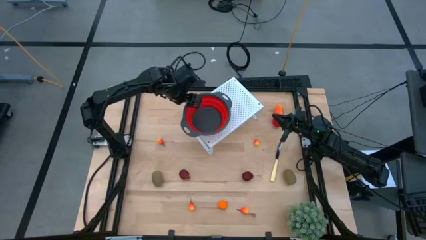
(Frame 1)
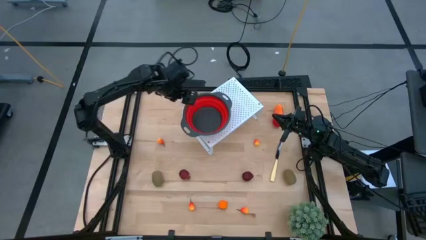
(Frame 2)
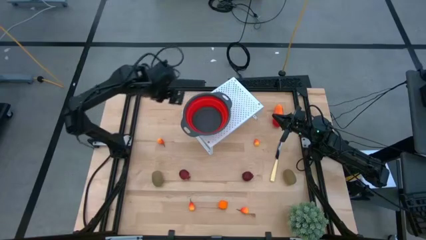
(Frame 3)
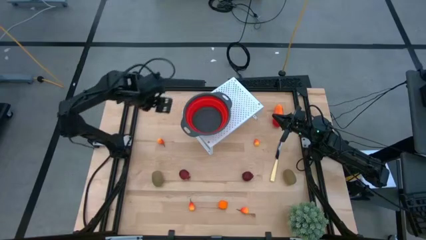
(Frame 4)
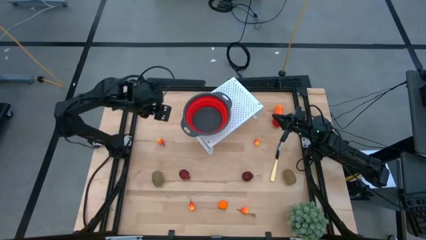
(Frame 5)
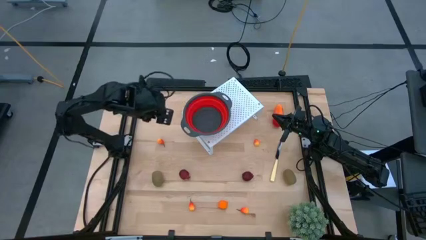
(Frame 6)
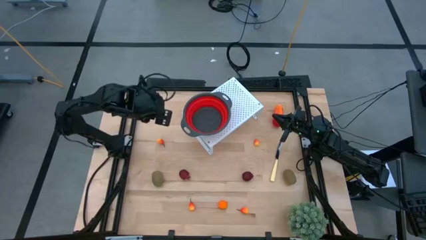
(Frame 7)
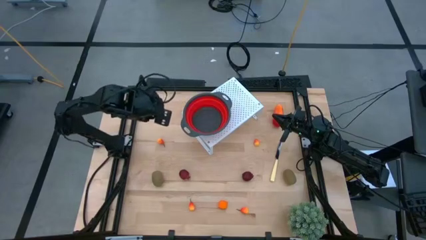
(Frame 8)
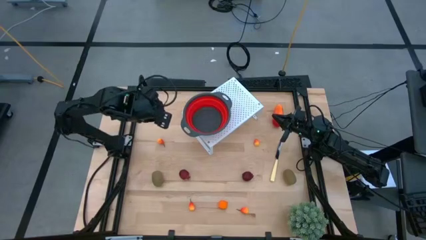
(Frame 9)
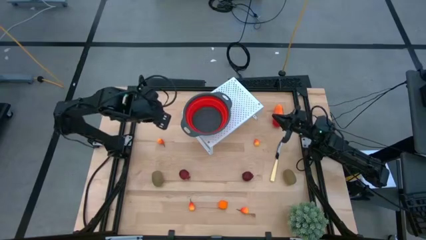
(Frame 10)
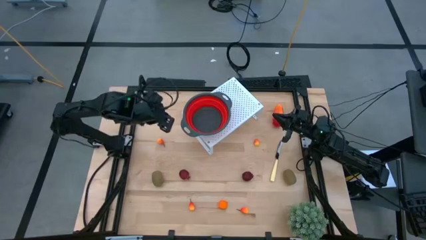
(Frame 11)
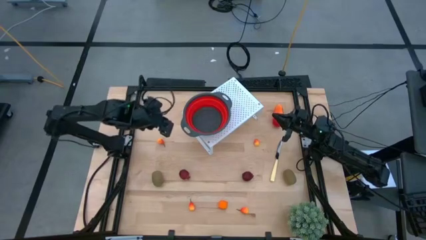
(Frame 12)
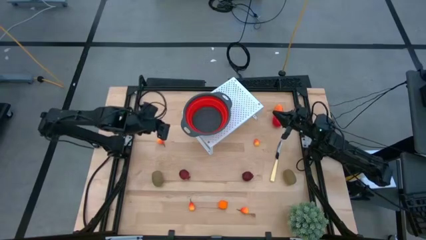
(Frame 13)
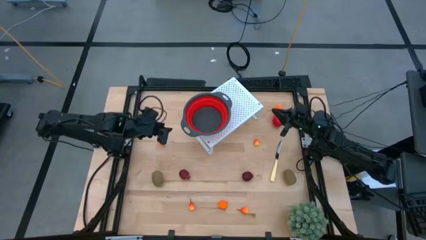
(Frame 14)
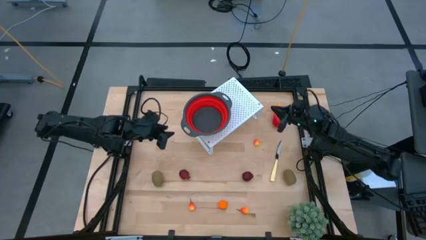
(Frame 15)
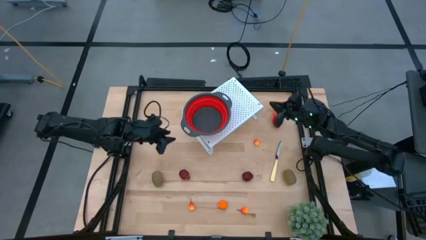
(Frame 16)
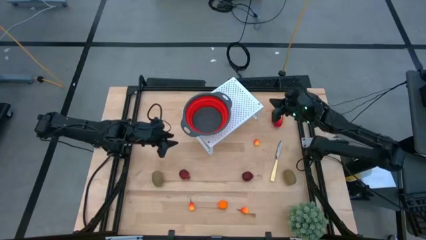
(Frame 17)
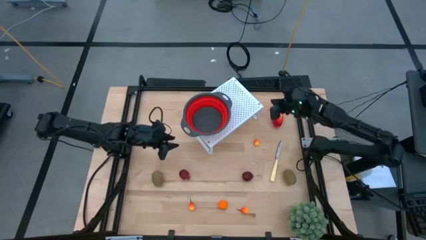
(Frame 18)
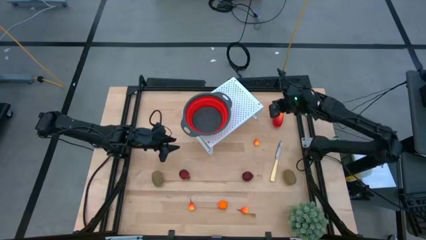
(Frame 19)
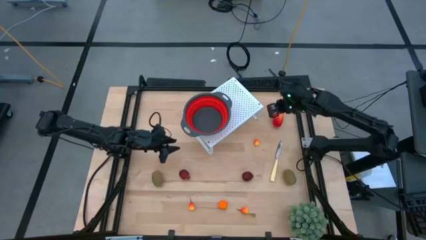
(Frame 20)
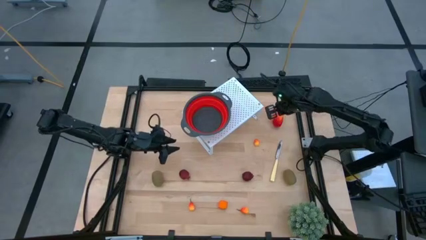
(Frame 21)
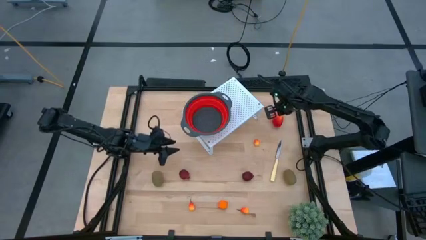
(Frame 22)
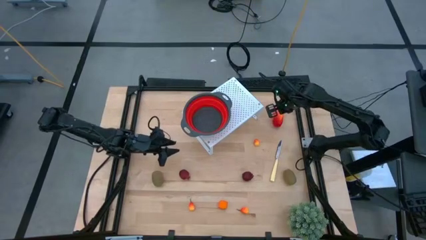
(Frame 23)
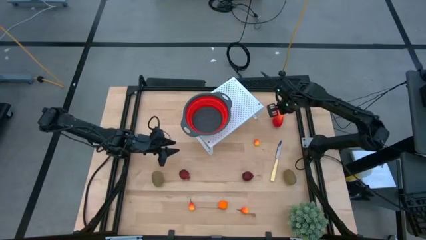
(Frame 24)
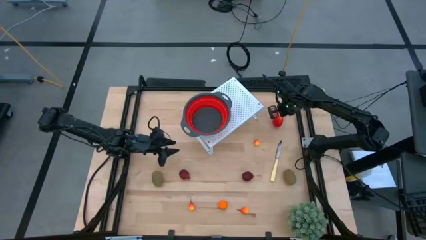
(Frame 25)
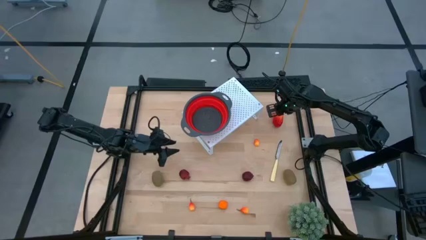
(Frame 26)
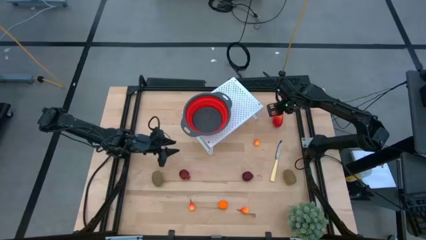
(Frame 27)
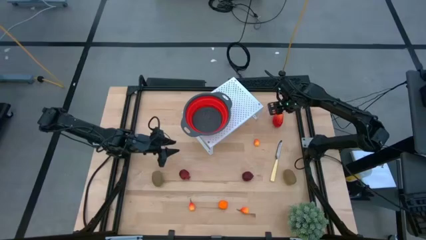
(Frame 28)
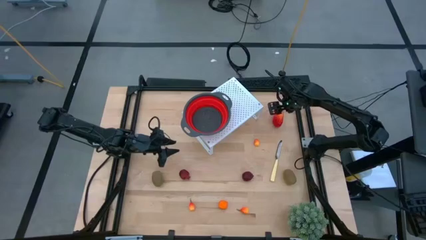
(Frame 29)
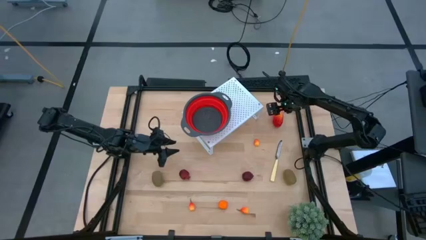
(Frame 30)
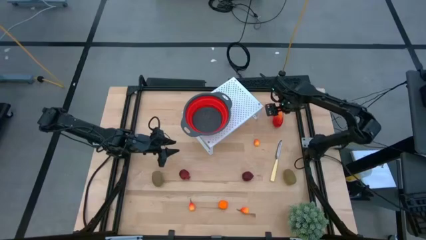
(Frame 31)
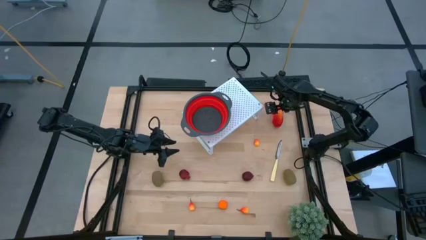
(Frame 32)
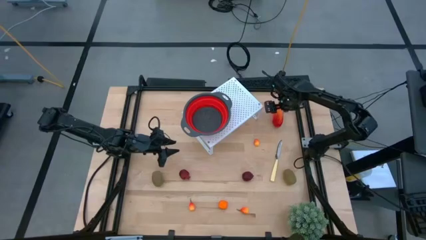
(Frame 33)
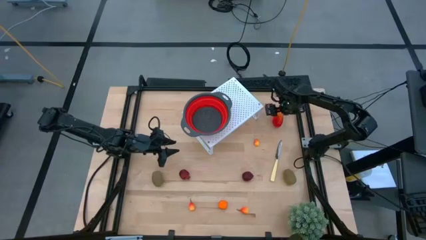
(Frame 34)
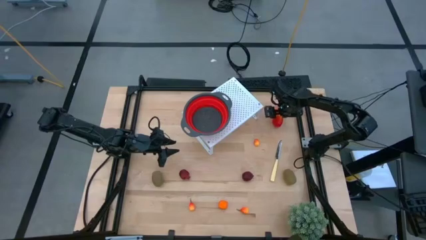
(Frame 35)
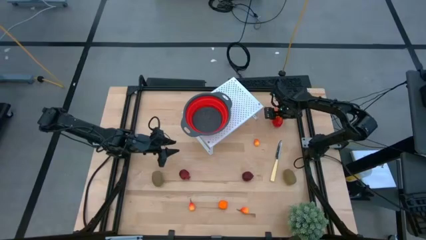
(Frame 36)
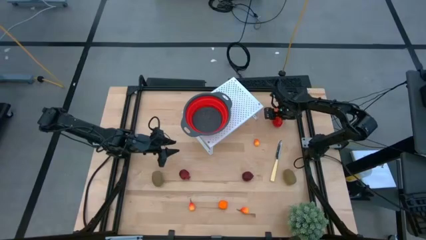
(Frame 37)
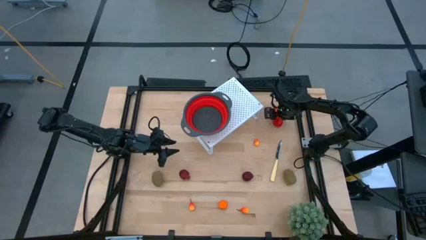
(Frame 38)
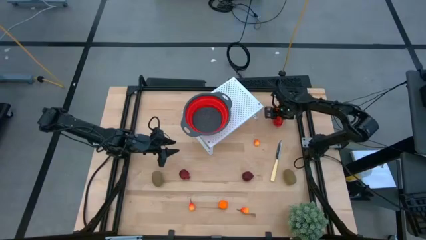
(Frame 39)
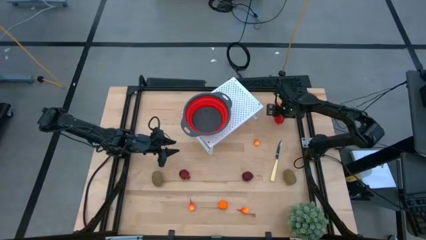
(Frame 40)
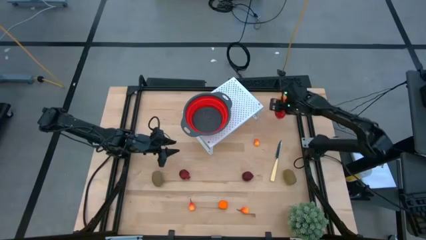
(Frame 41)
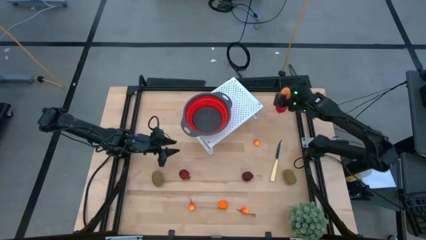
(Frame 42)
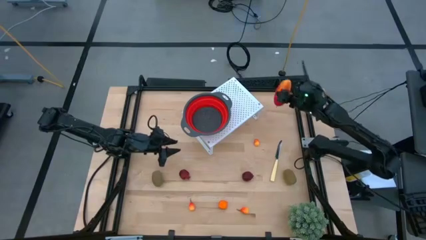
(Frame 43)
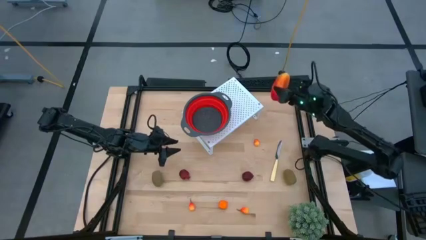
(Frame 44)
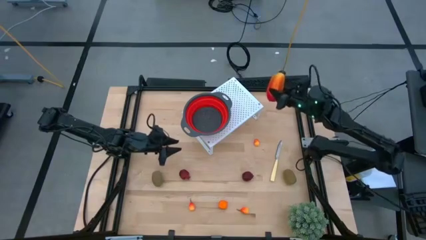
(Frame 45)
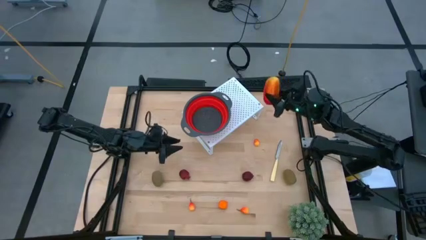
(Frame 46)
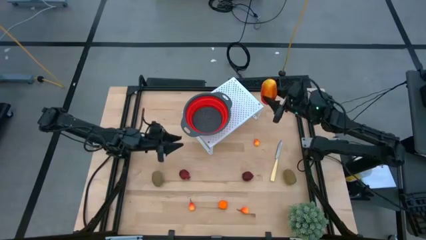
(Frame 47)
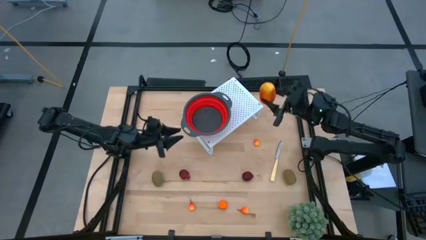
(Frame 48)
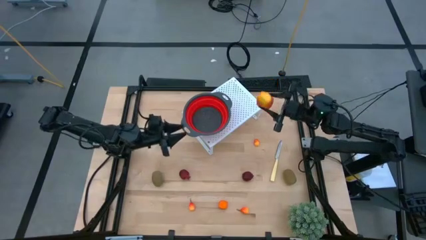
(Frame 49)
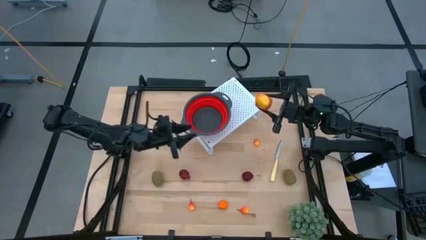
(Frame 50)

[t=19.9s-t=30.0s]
Task: Pick & Place Fruit
Put the mango into the red strainer bowl on the shelf

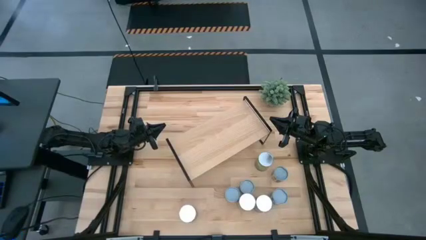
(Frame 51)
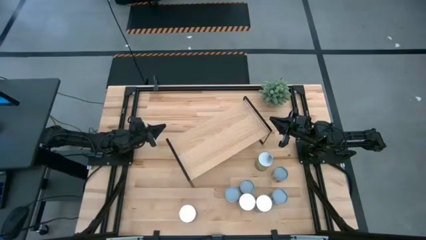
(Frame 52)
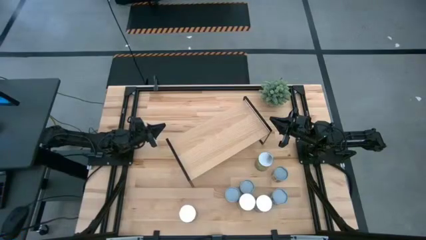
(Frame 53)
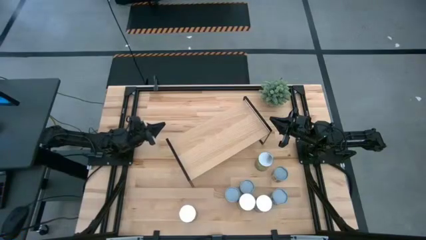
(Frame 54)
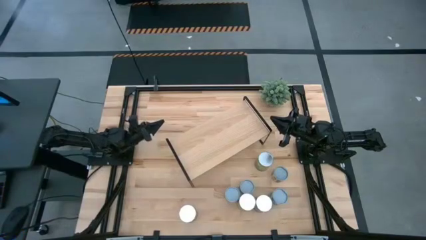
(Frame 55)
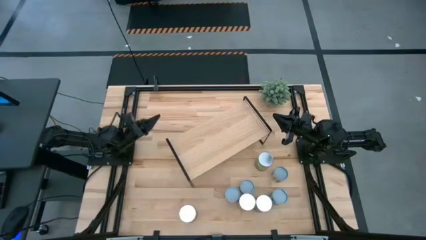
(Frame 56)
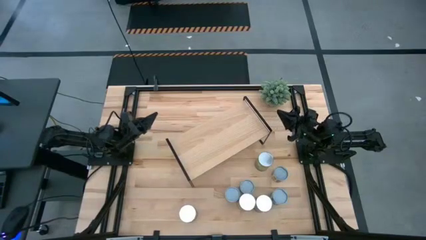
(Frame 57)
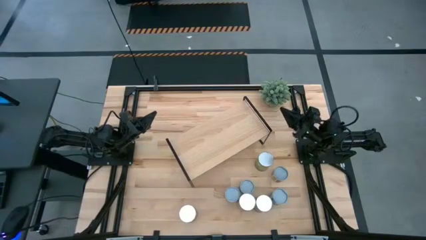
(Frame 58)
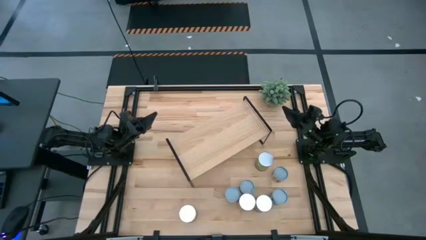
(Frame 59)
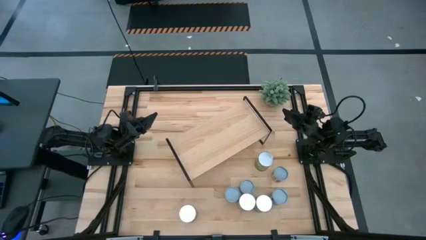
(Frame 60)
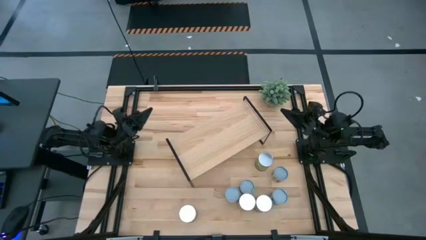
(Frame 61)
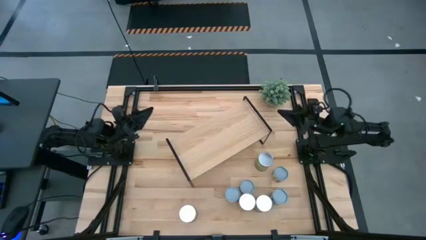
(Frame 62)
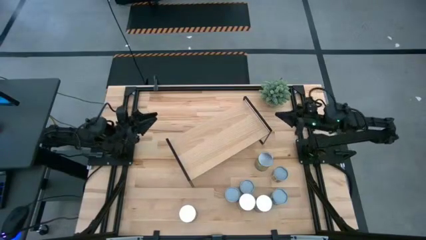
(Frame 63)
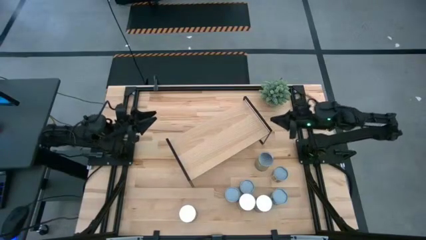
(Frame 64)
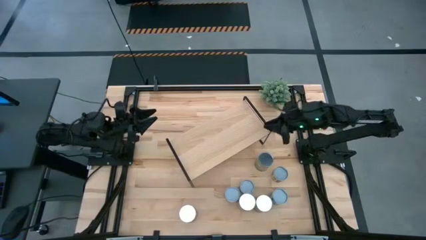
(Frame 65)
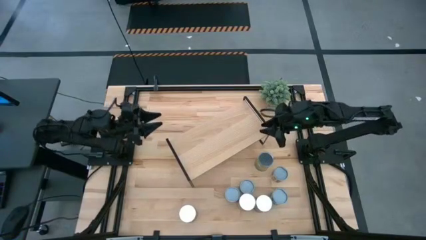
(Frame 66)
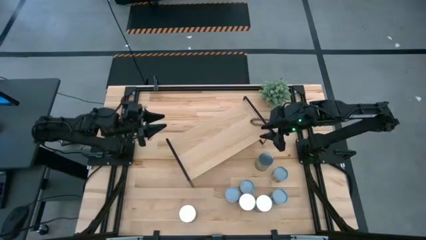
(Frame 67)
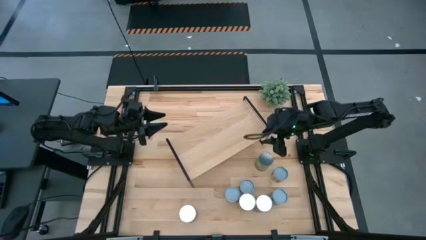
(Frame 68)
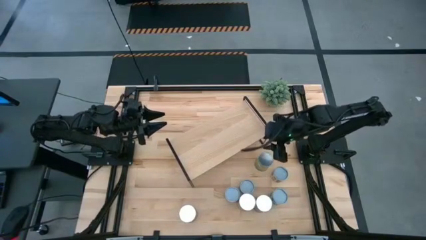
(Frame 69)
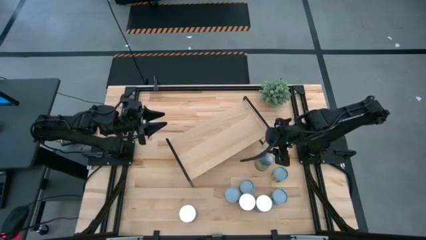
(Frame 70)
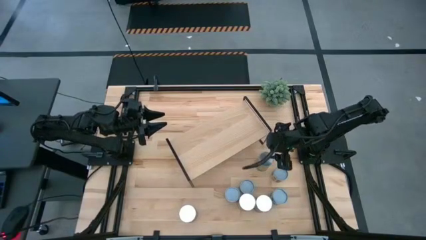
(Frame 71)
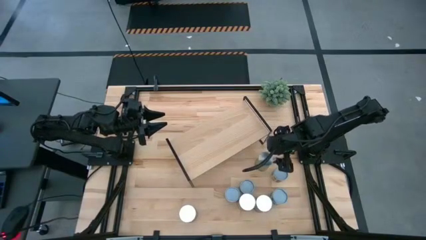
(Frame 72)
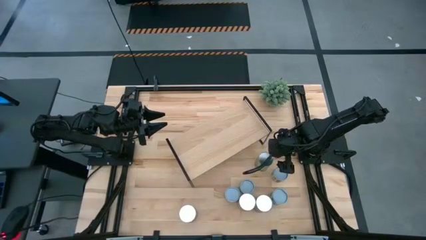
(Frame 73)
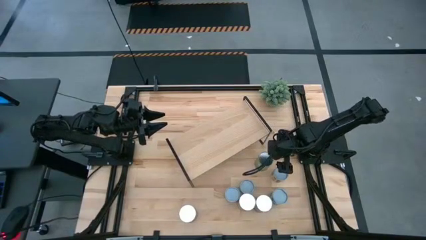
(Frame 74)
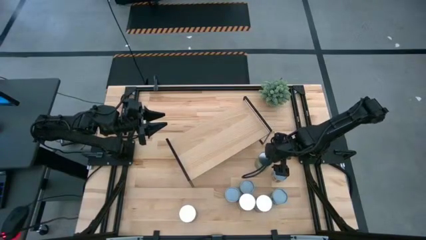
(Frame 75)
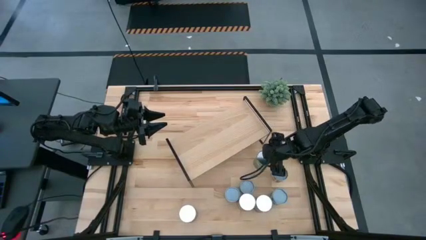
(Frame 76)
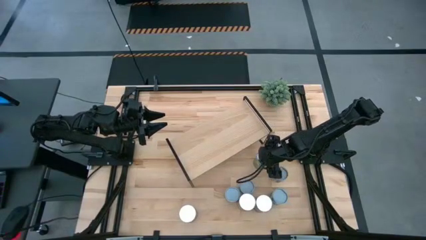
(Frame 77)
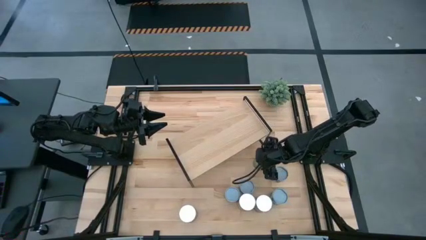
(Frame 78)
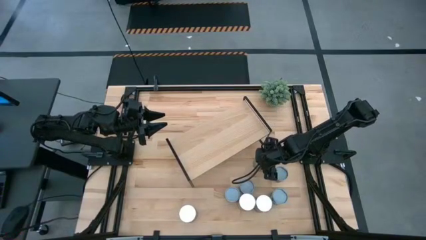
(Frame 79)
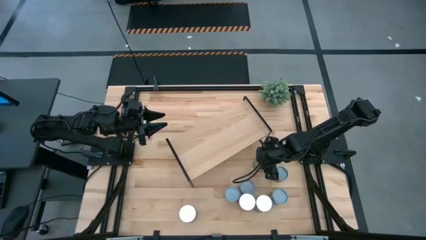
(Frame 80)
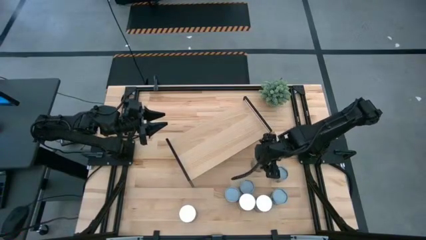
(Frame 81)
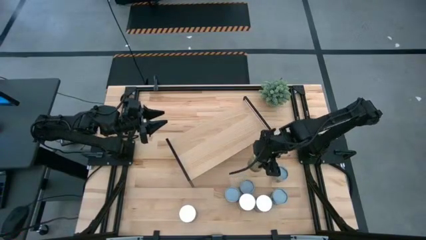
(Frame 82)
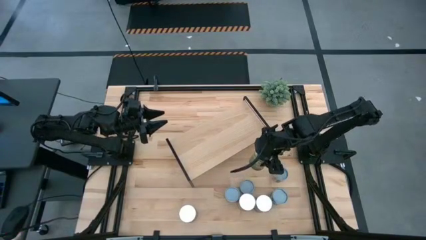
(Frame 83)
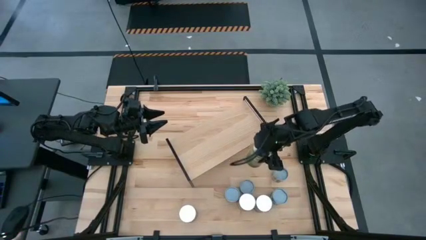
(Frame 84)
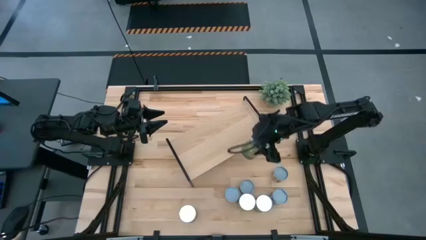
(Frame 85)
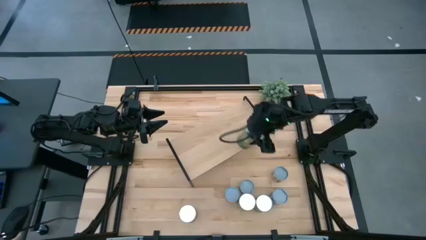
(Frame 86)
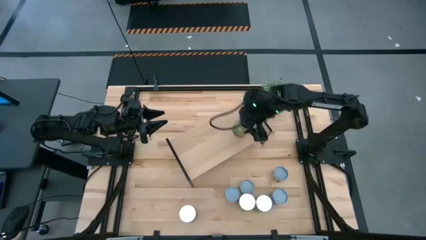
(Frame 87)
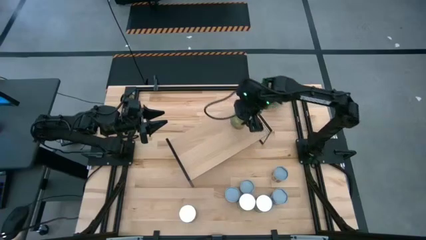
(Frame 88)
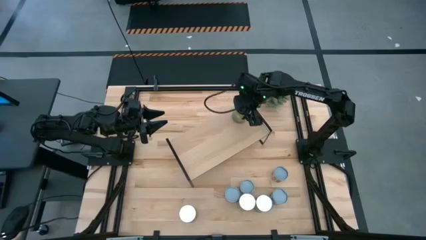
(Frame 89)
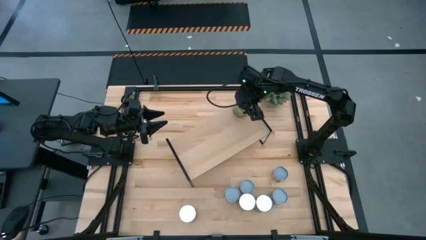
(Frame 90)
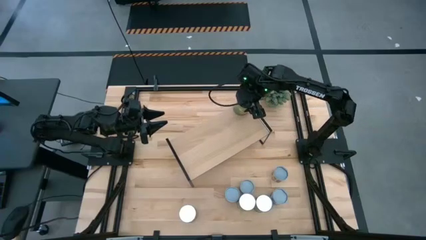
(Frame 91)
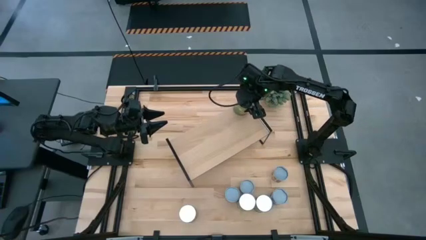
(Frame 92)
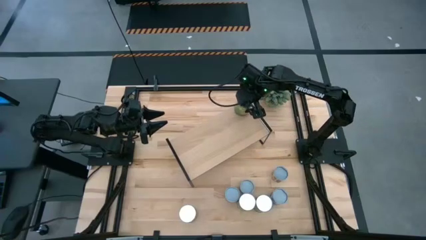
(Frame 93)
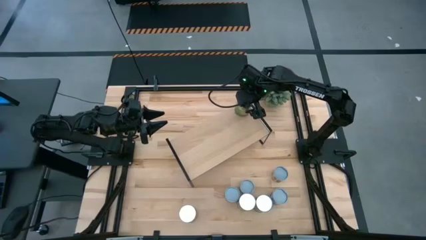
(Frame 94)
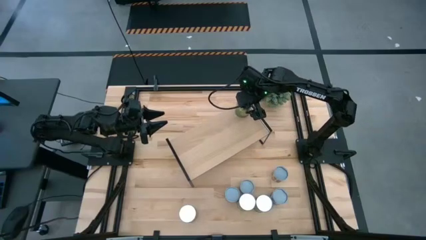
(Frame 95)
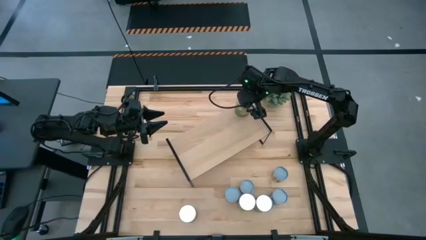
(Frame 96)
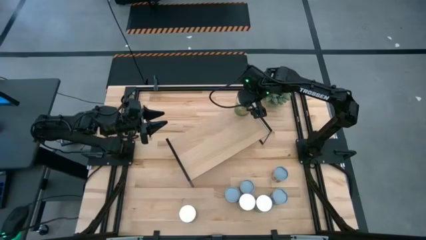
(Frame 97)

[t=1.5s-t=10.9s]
Task: Pick and place cans onto a shelf
Put the big canned oranges on the shelf
